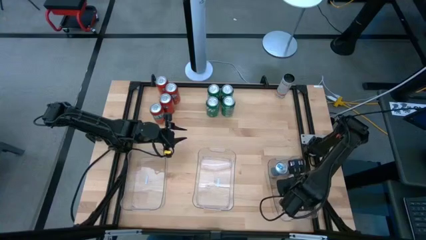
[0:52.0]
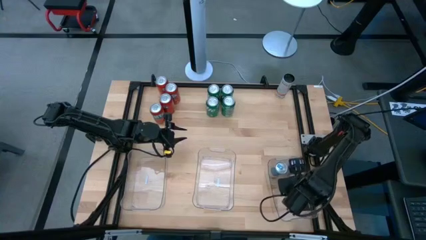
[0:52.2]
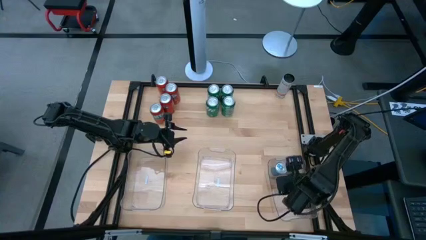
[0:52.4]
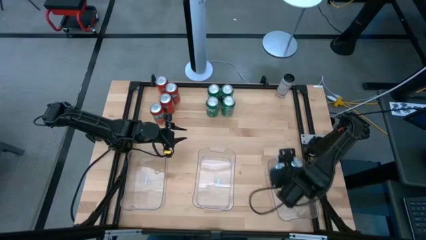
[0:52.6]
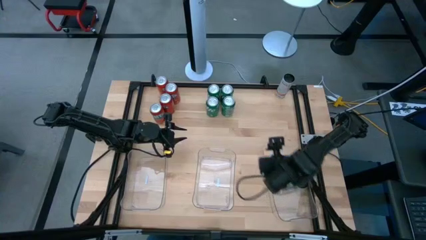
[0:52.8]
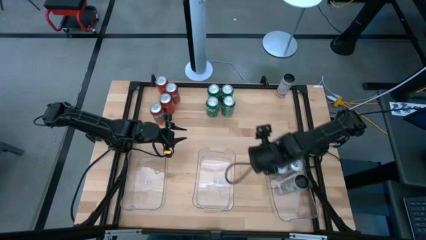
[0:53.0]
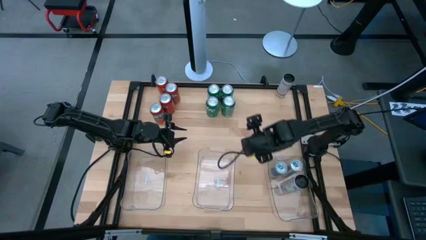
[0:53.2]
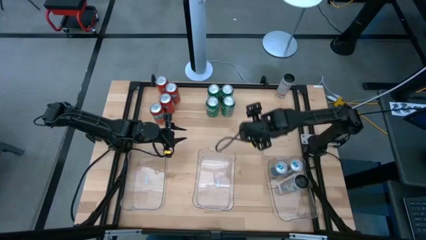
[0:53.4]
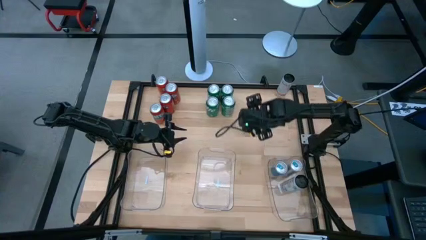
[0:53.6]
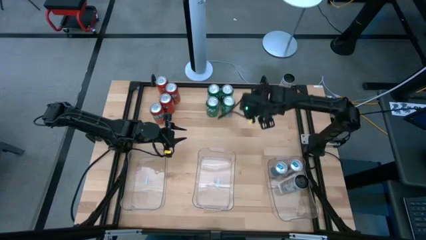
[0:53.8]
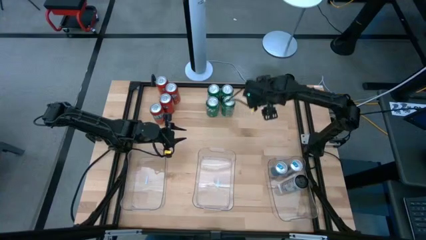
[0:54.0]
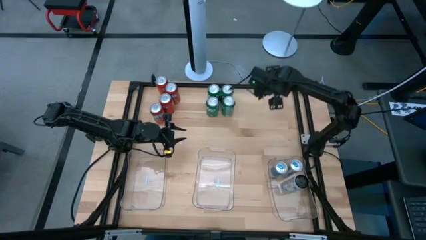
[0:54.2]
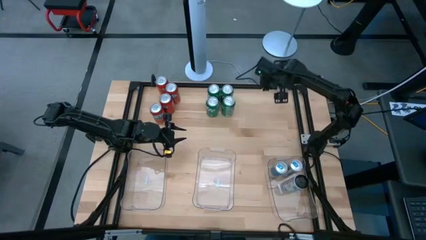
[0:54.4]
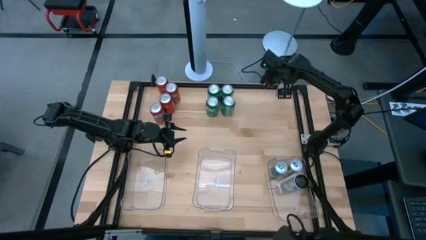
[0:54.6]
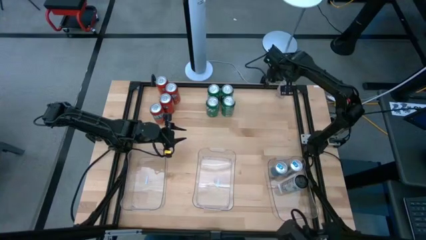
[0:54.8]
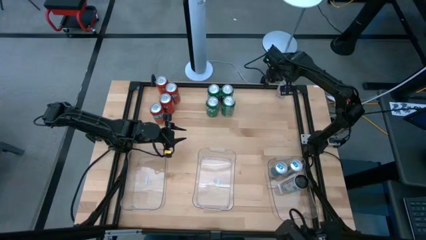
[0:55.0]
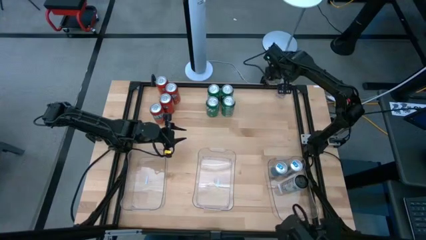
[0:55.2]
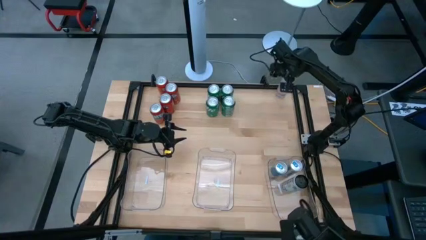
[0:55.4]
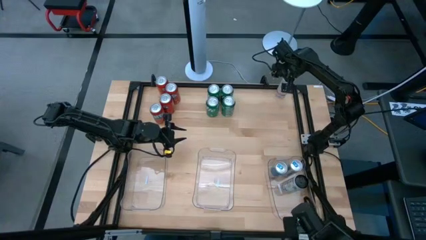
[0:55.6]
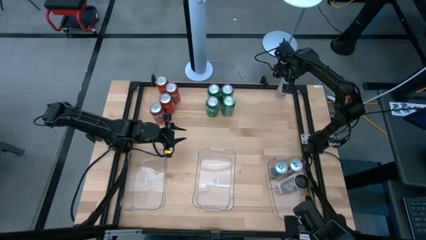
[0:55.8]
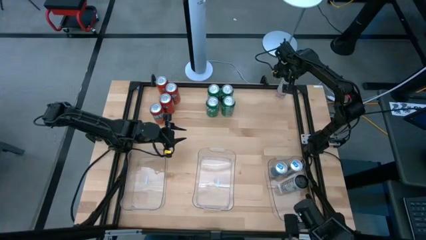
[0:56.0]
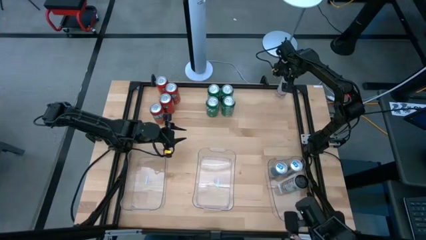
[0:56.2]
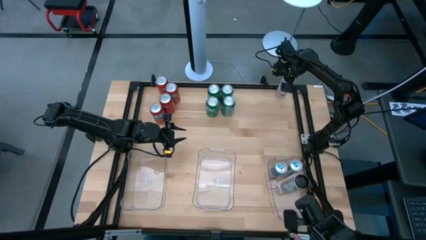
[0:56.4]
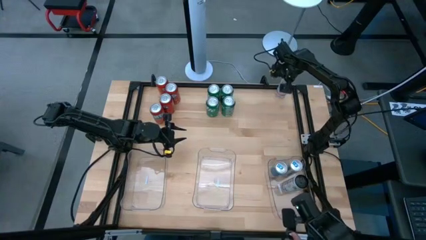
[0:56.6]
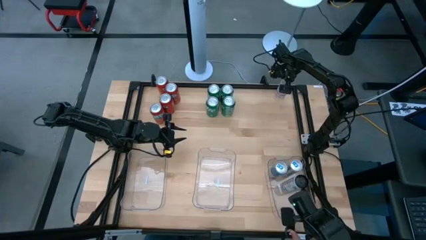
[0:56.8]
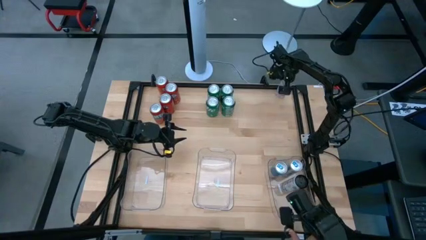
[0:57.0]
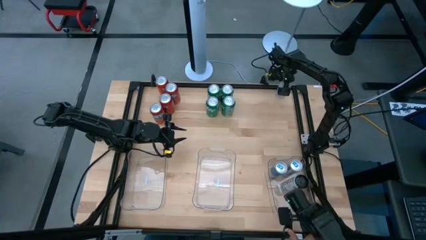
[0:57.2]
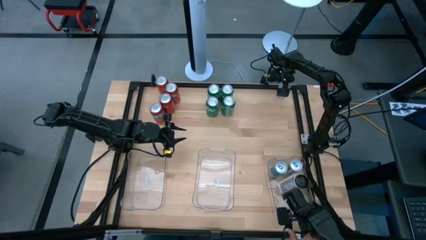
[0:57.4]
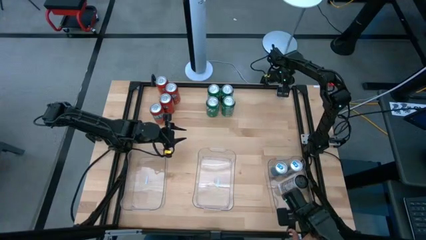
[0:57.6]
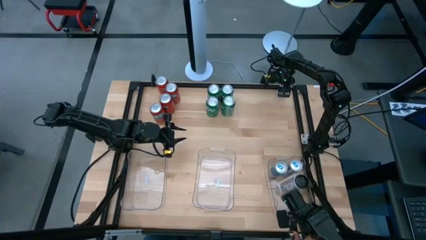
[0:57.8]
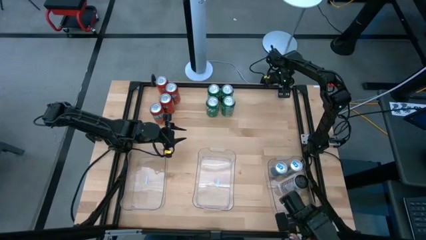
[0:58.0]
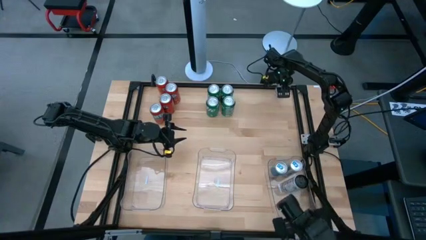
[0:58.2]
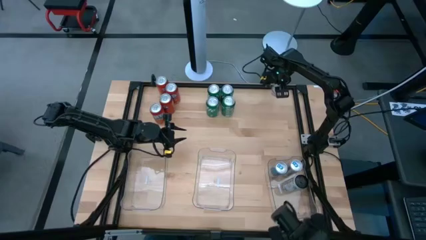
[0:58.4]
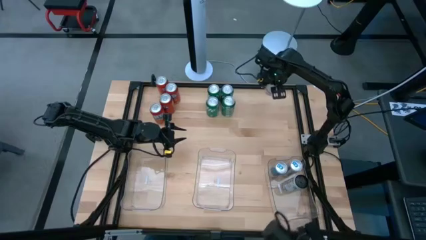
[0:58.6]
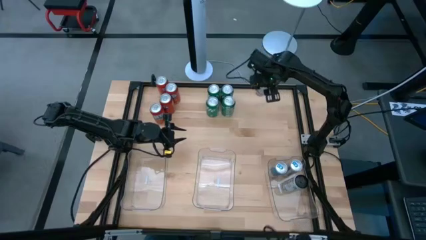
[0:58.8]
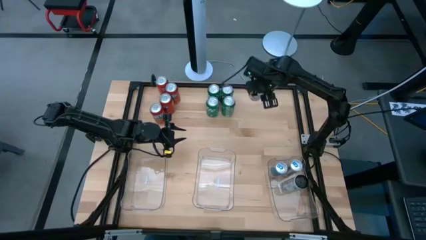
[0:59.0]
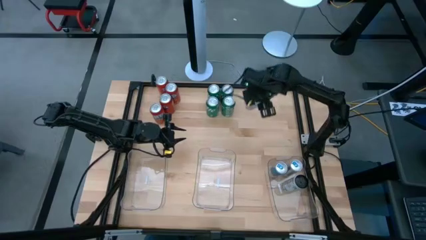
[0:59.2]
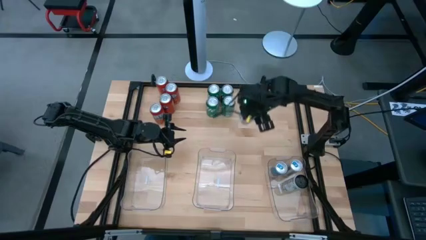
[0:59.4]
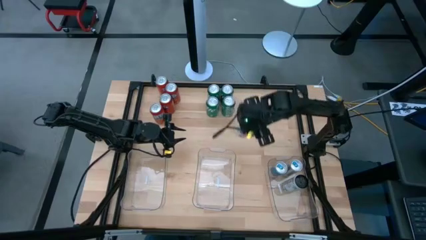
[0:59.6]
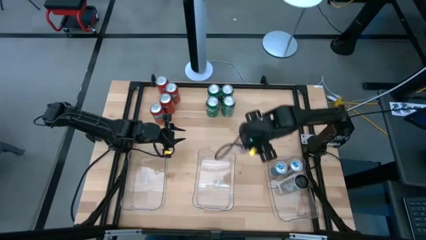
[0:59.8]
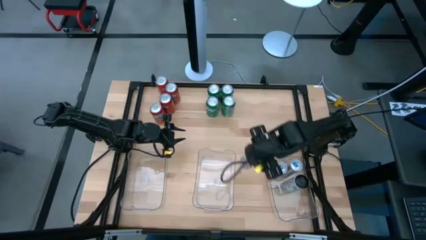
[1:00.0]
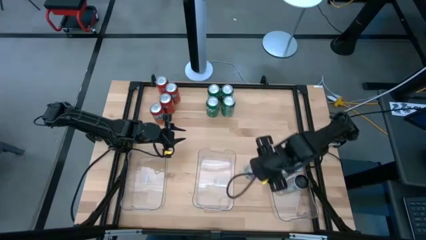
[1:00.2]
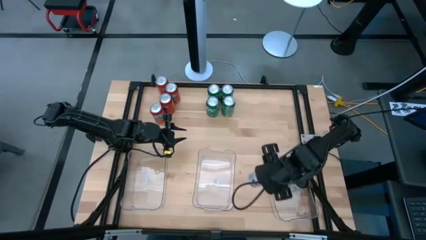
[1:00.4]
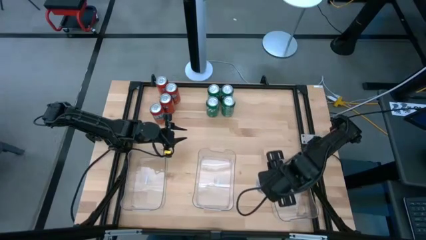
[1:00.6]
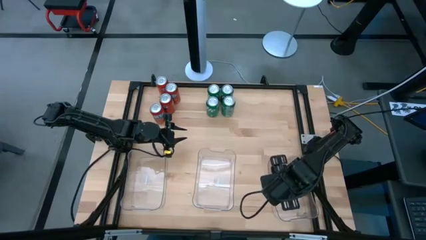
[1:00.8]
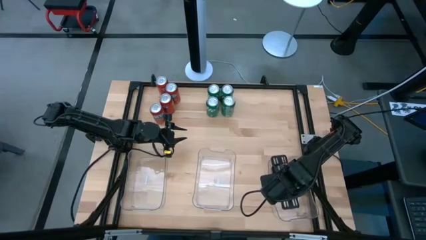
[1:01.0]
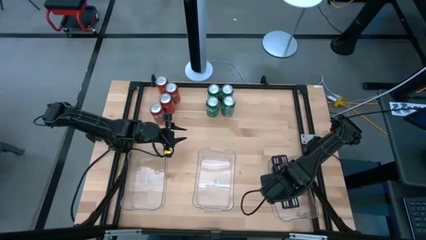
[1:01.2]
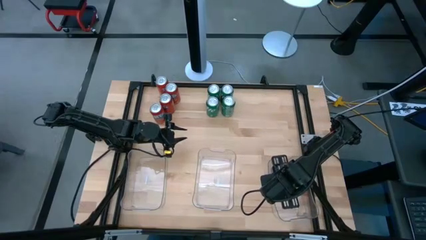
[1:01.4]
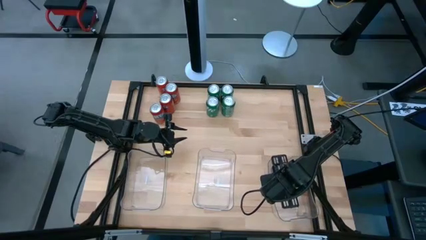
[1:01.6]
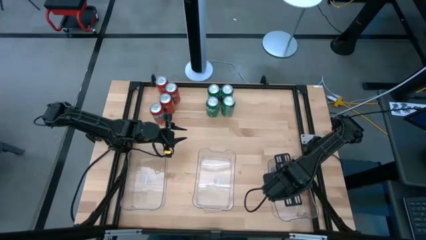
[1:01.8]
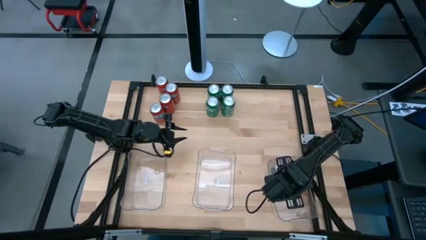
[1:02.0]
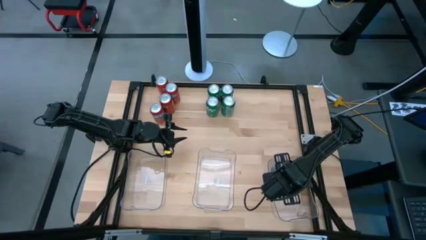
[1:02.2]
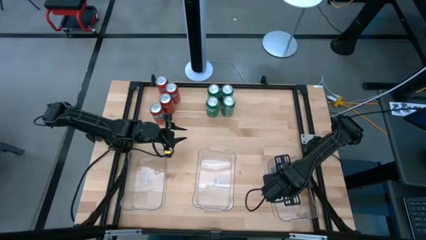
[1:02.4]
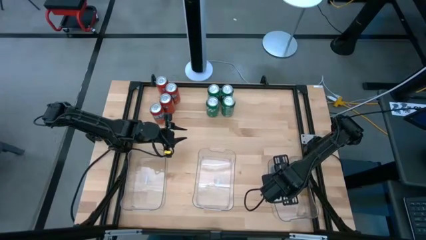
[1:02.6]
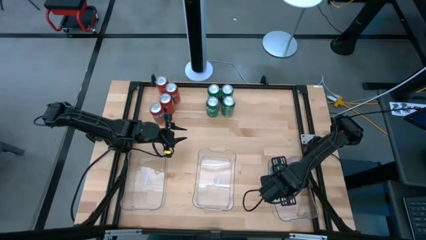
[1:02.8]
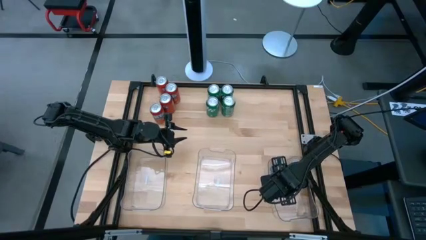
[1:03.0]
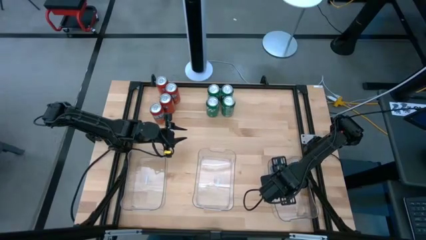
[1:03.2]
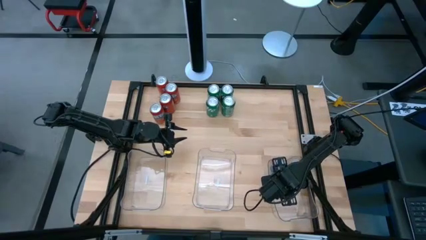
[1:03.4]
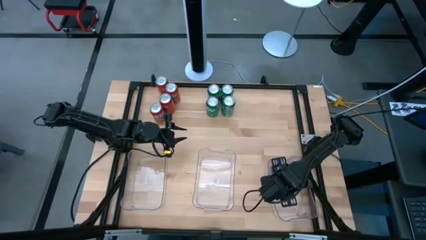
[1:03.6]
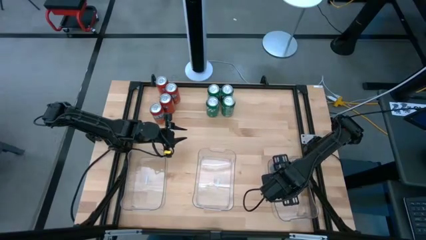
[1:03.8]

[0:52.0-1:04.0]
Task: Sort soda cans
Put the white and pink soda can into the right transparent bin
